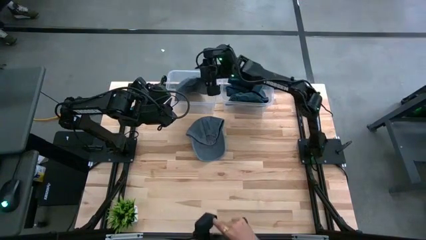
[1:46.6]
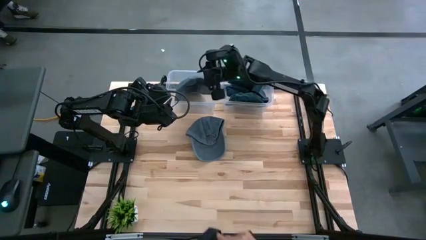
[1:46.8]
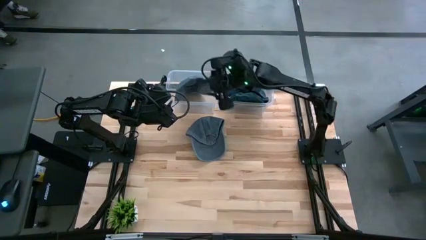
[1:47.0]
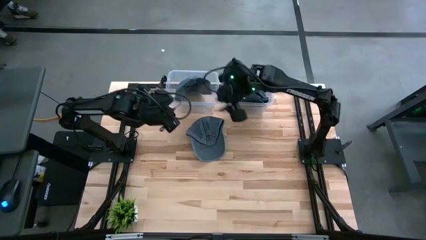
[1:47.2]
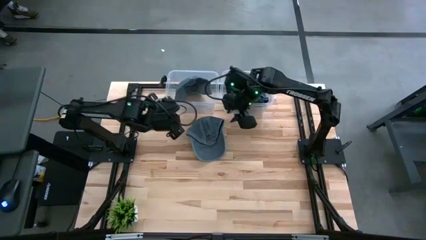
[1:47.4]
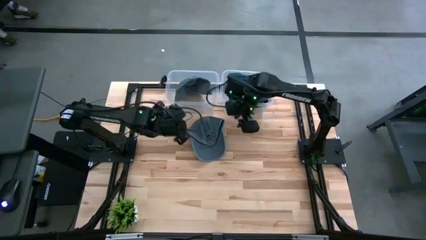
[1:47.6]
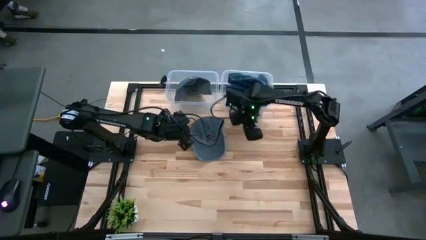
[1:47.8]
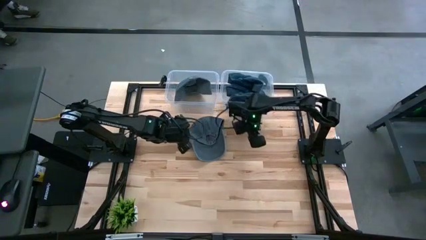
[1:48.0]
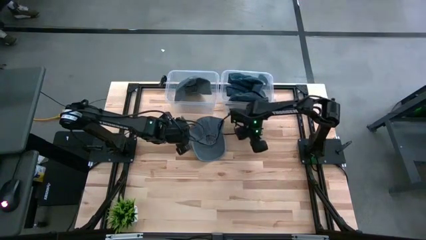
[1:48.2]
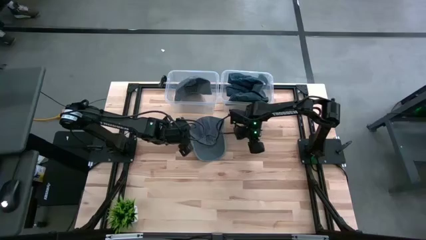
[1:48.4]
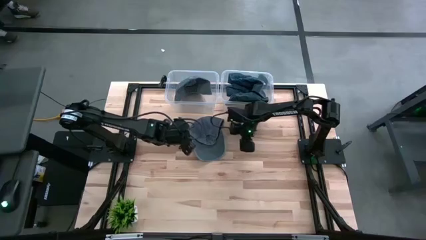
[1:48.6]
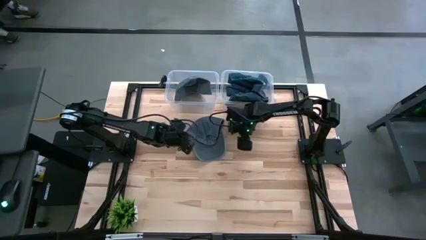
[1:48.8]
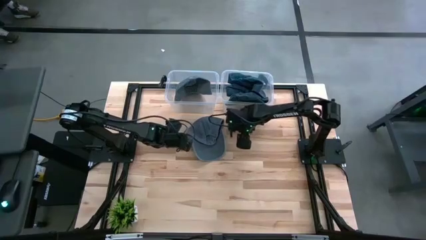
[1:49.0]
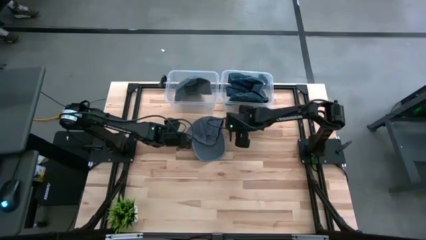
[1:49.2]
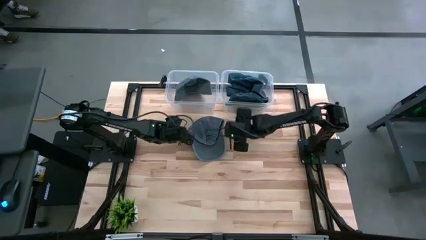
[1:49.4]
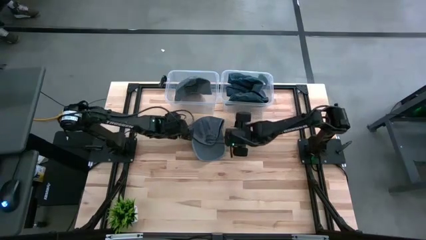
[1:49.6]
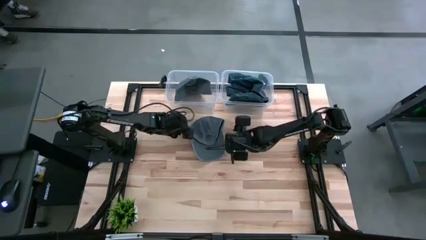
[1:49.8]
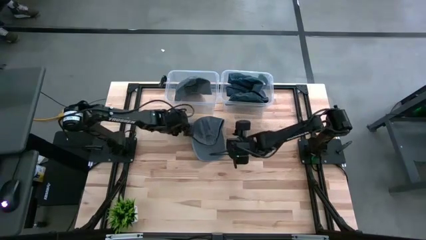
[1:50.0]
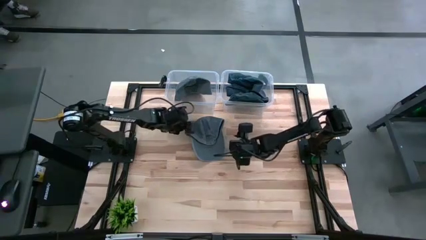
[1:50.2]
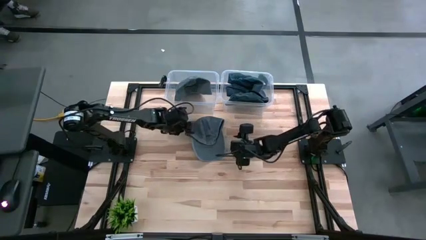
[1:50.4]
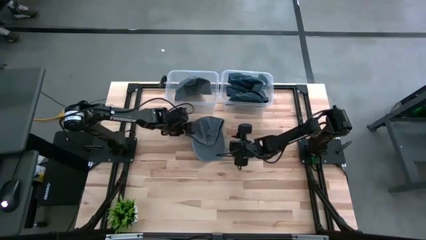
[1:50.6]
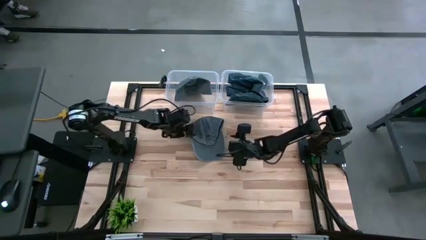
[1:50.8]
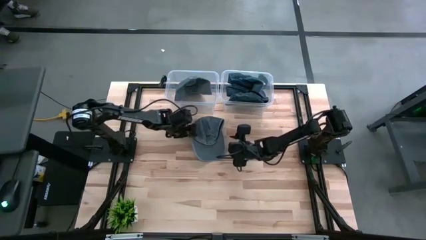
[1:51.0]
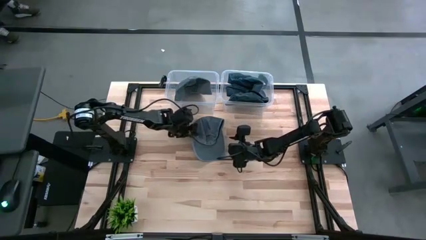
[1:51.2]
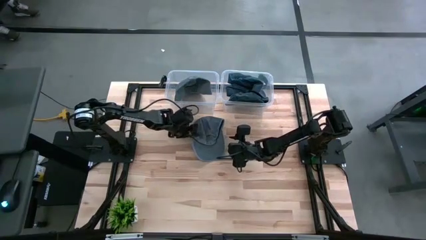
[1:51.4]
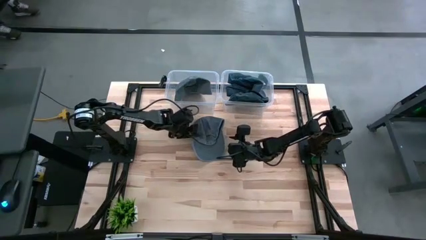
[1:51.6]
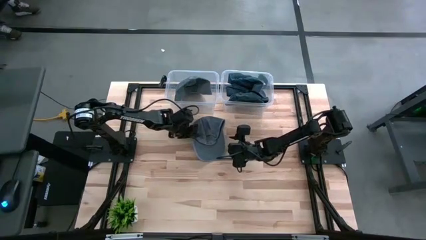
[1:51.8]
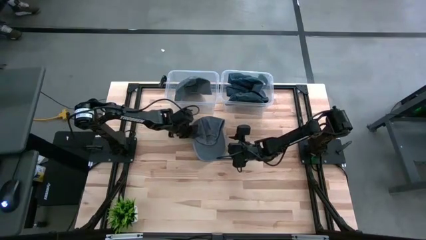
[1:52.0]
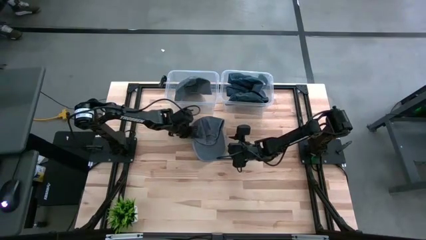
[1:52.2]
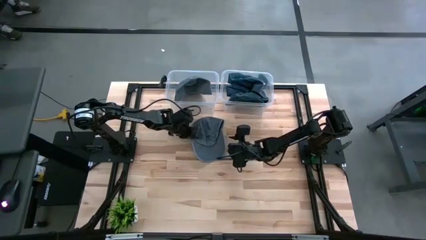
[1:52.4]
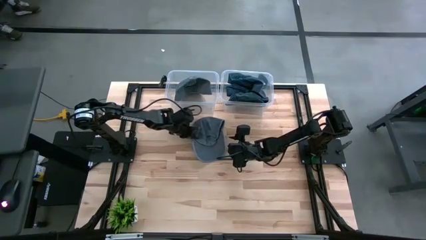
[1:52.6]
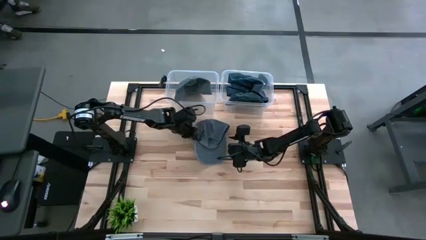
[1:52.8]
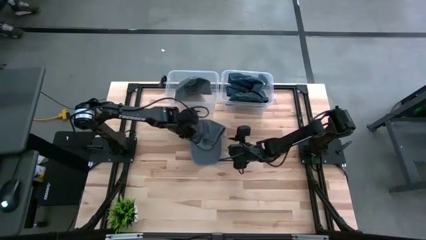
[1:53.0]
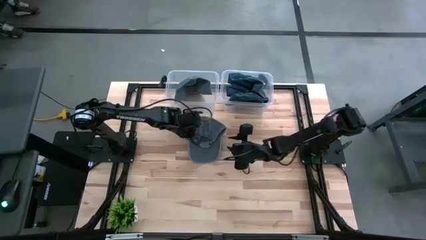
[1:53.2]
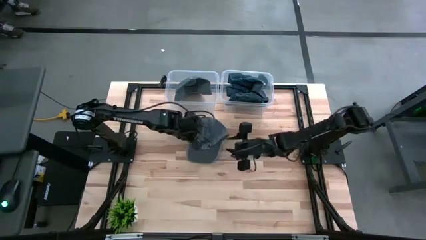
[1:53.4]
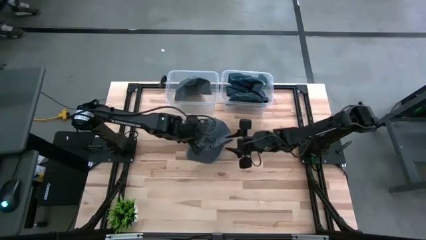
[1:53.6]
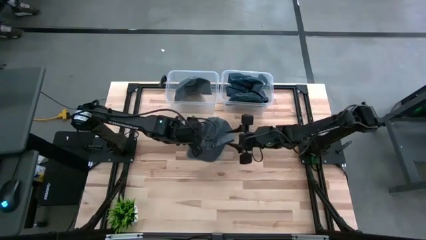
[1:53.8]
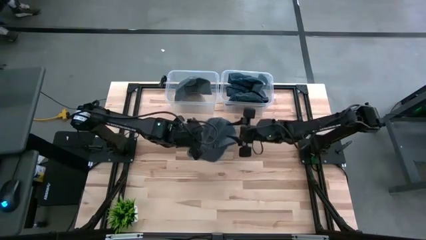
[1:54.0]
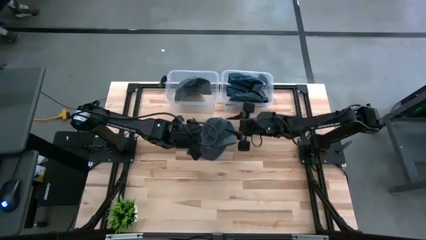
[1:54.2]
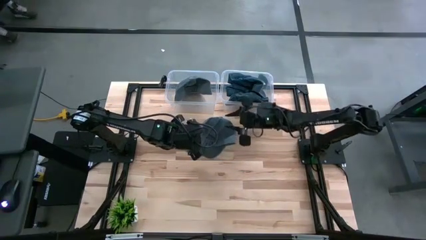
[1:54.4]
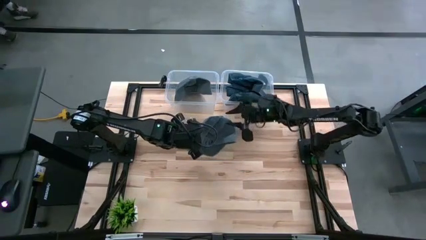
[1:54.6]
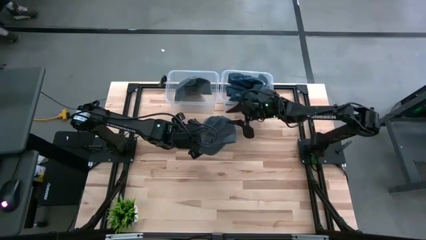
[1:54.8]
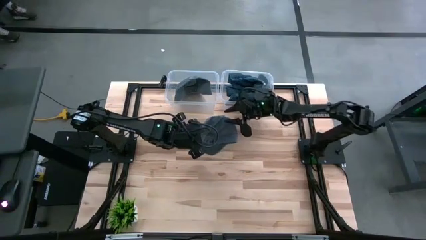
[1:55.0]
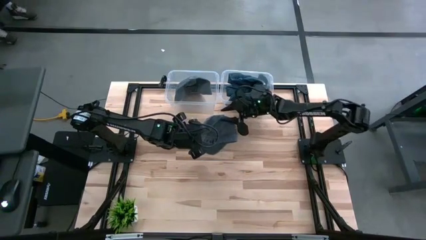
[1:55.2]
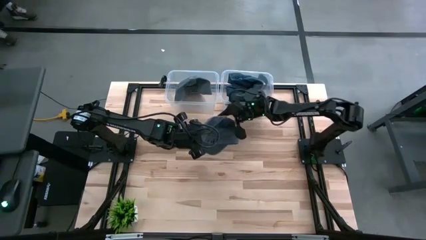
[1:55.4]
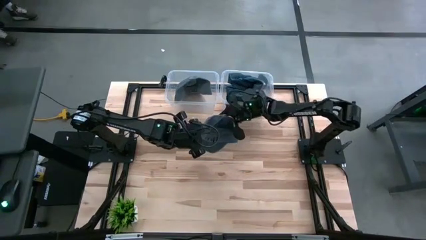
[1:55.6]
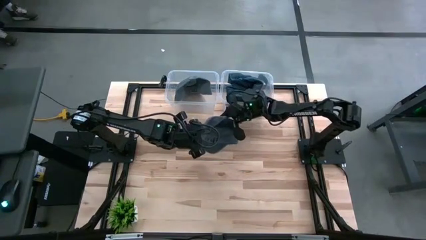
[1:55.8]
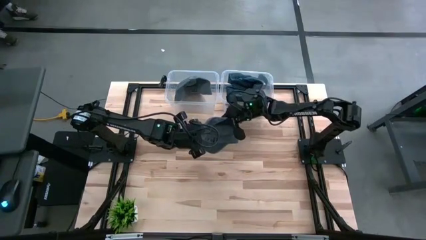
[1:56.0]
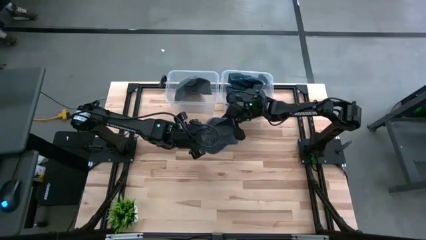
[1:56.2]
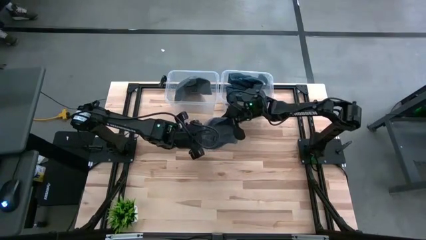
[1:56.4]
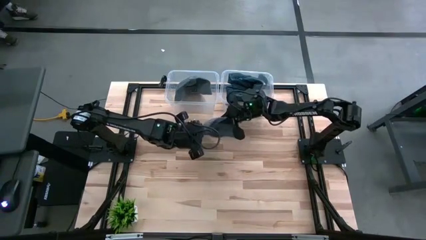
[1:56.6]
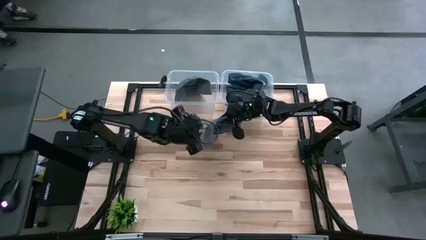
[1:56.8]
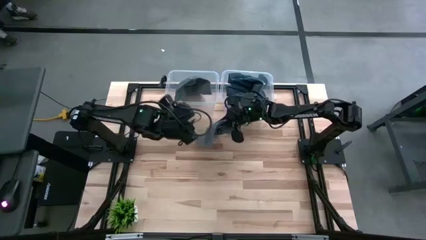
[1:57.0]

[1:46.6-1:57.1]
Task: Pick & Place hat
Put the gray cap into the left transparent bin

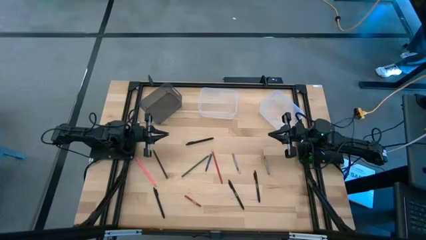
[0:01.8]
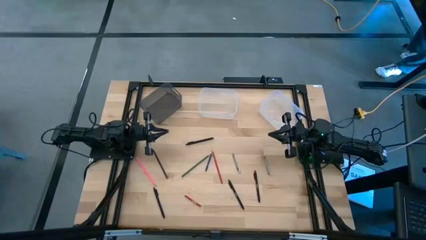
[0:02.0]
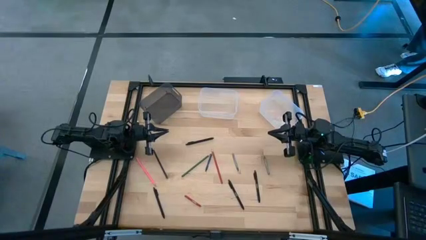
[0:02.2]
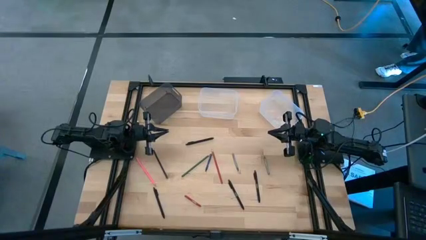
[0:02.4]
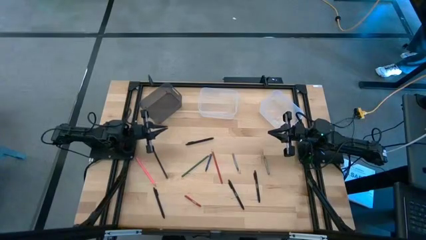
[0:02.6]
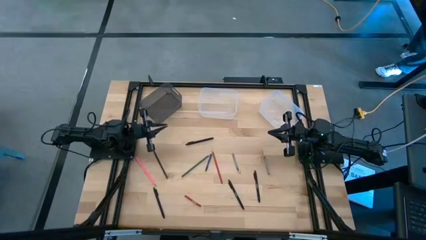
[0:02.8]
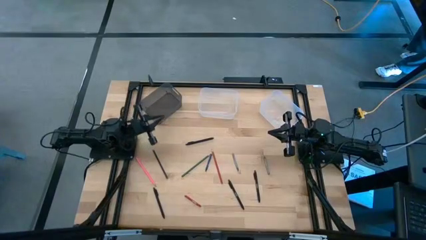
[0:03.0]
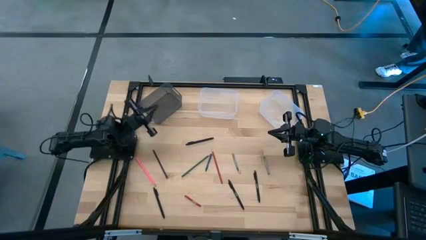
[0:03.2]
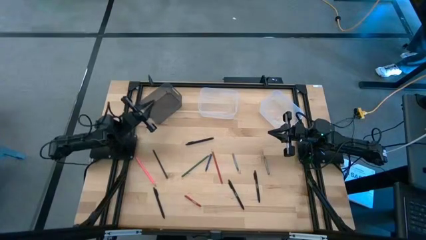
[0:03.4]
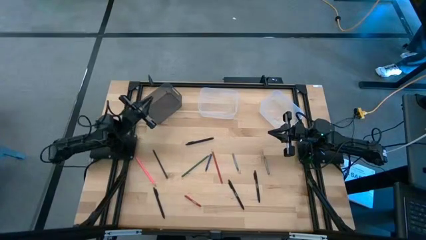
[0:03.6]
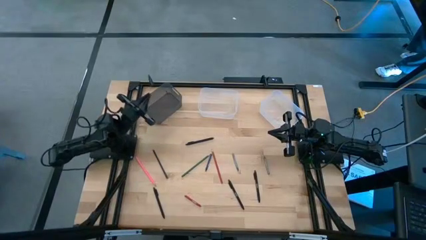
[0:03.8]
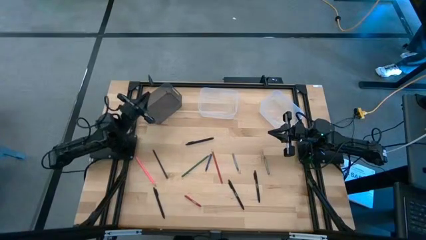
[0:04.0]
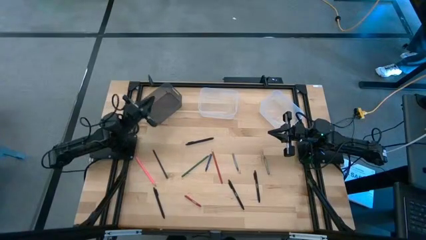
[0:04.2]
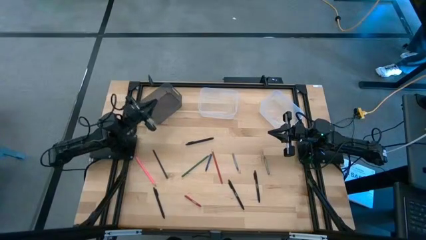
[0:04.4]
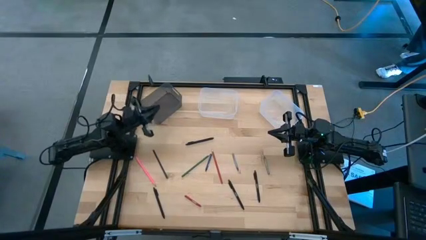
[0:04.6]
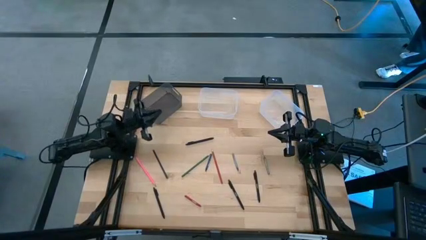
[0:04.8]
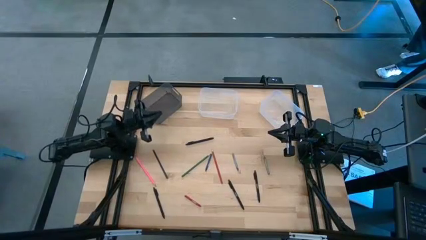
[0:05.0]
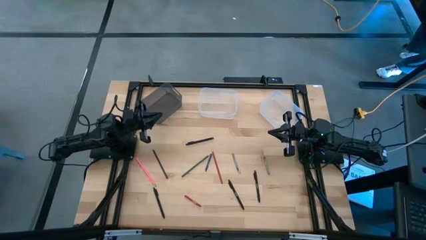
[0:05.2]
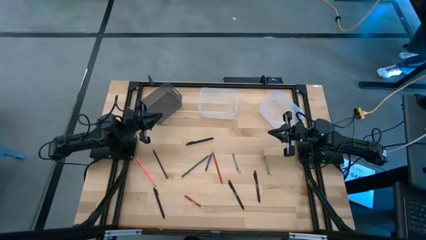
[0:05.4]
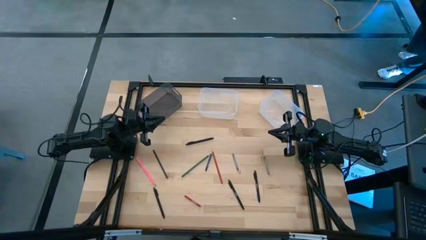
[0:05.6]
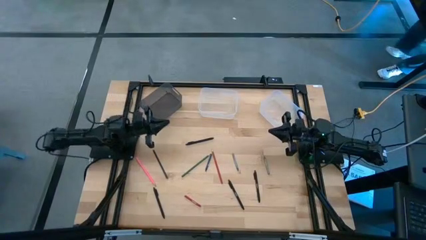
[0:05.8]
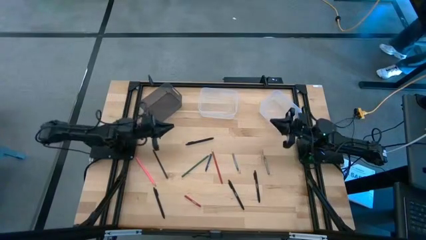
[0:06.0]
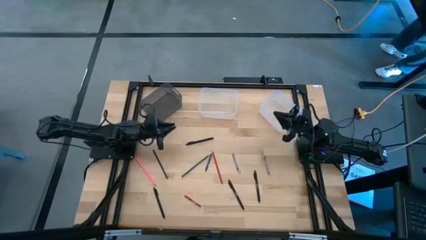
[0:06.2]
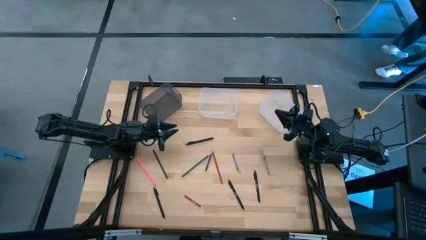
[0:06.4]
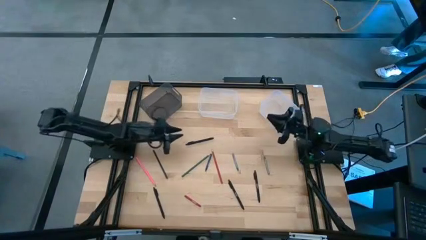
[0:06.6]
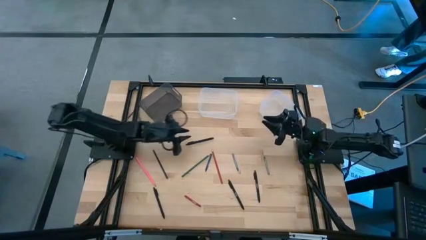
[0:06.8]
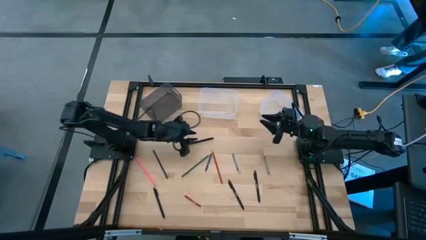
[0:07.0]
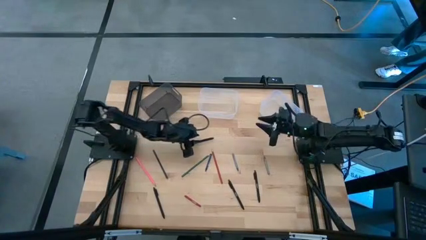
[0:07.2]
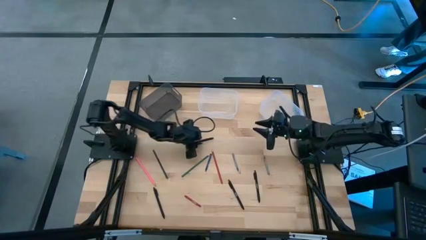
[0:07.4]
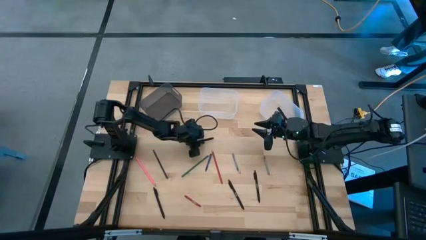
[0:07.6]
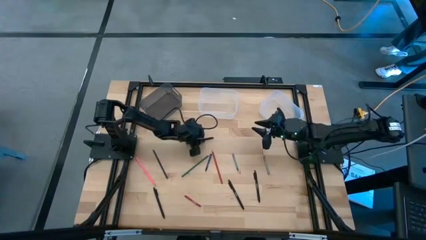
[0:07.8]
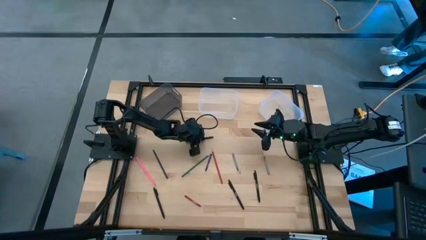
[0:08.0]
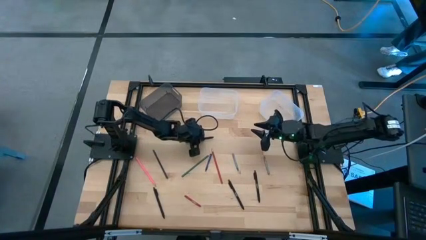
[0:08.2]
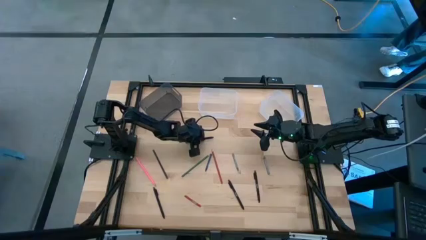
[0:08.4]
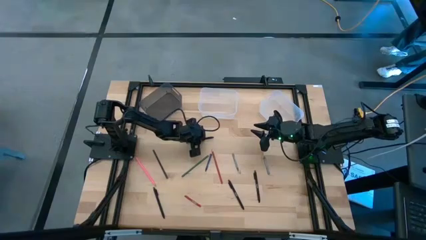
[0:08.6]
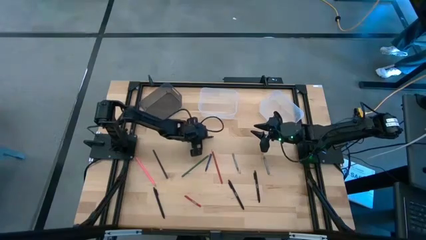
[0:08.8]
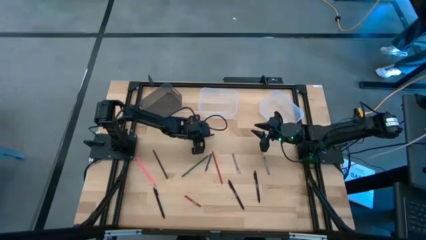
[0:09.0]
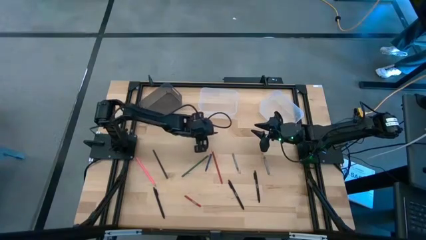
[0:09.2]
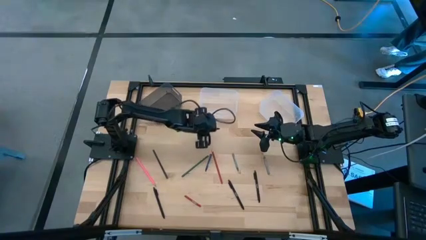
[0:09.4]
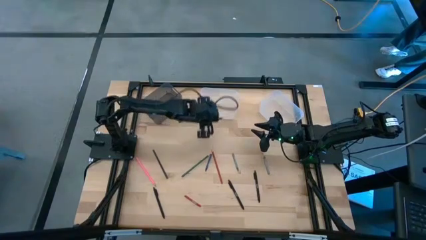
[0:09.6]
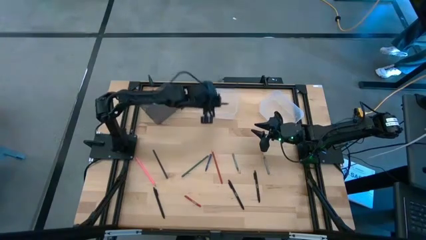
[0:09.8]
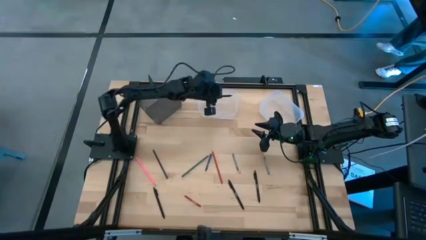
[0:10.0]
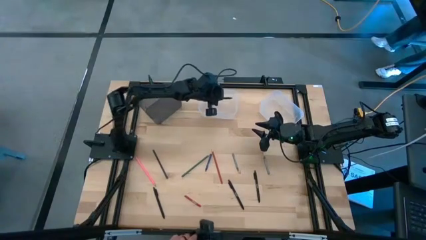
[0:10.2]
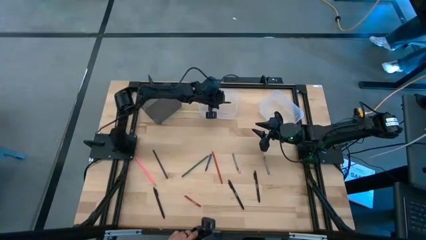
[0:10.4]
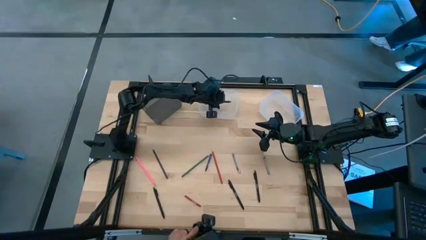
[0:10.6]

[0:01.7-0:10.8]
Task: Sort crayons/erasers/pens/pencils in bins
Put the black pen into the left transparent bin
